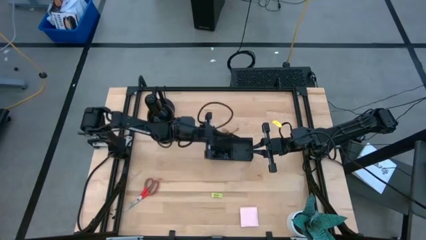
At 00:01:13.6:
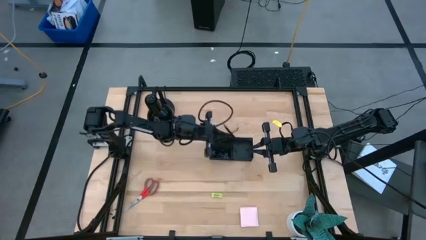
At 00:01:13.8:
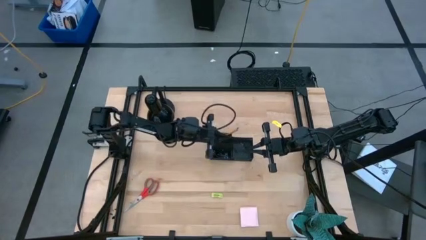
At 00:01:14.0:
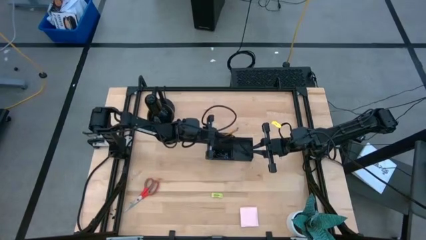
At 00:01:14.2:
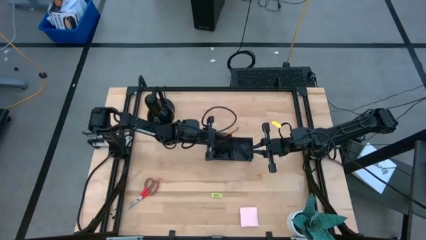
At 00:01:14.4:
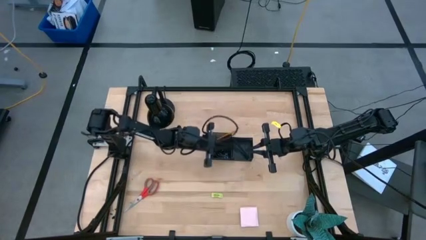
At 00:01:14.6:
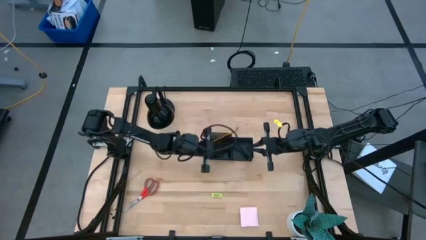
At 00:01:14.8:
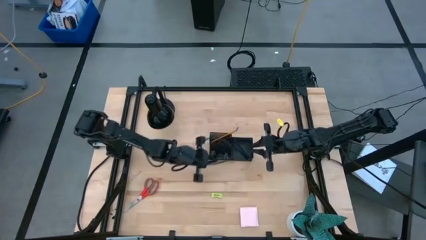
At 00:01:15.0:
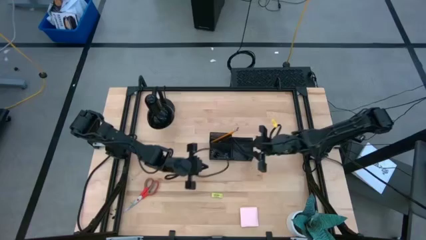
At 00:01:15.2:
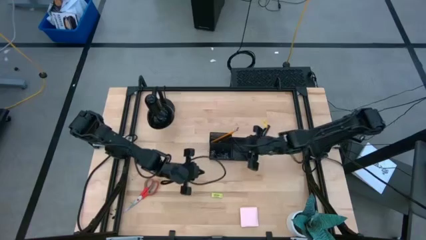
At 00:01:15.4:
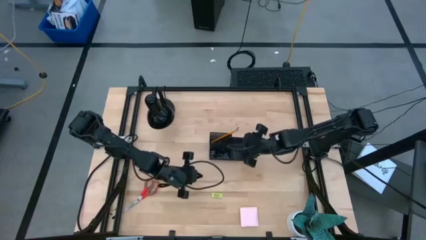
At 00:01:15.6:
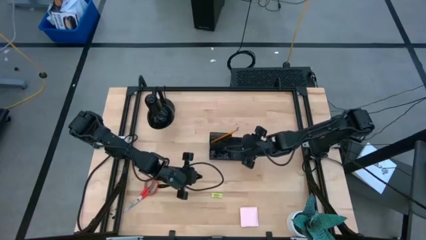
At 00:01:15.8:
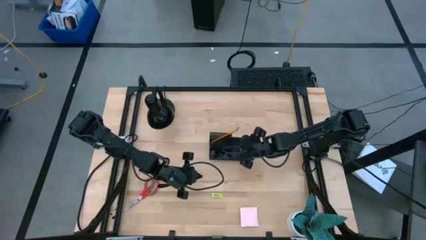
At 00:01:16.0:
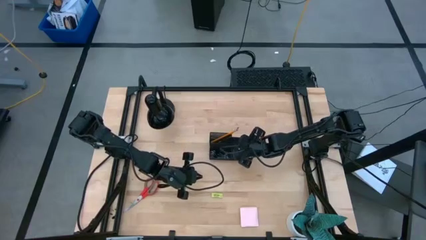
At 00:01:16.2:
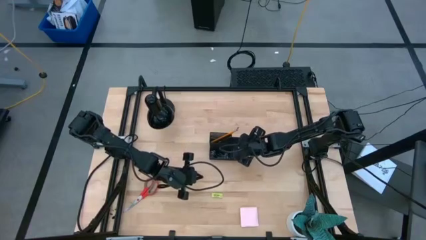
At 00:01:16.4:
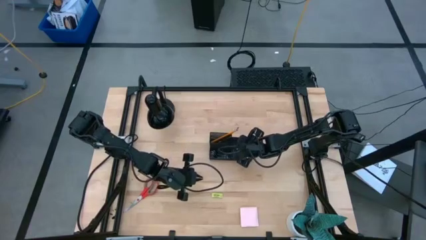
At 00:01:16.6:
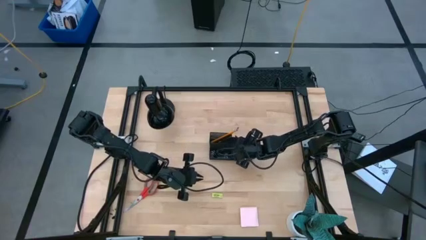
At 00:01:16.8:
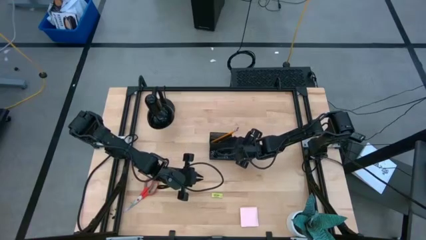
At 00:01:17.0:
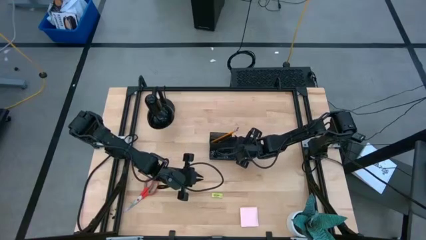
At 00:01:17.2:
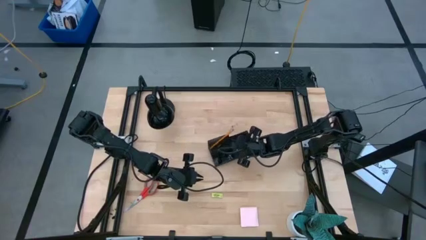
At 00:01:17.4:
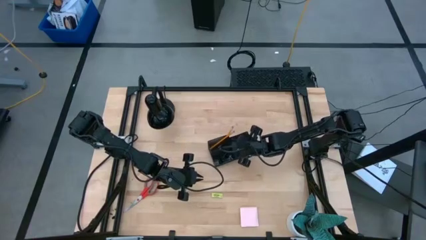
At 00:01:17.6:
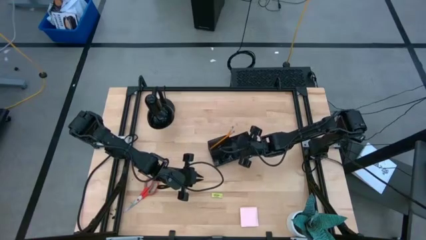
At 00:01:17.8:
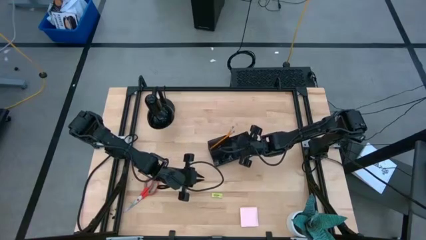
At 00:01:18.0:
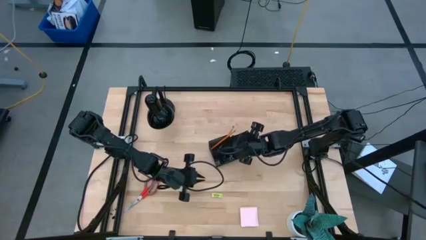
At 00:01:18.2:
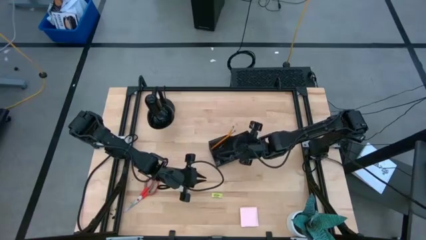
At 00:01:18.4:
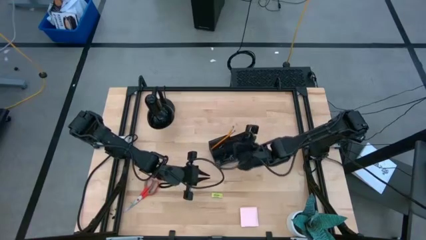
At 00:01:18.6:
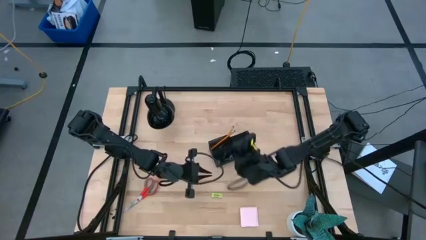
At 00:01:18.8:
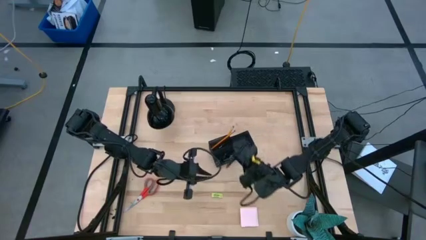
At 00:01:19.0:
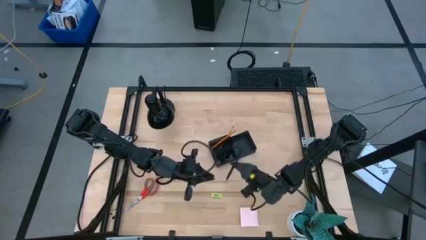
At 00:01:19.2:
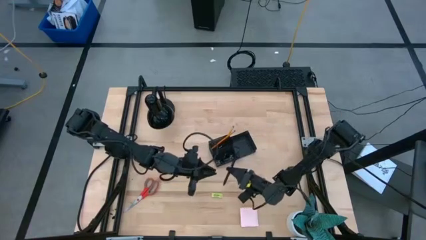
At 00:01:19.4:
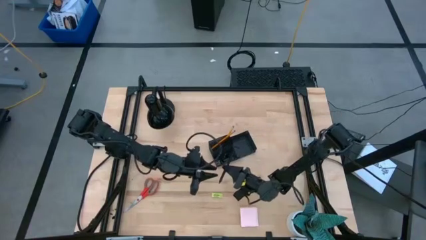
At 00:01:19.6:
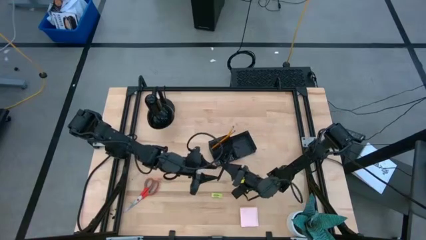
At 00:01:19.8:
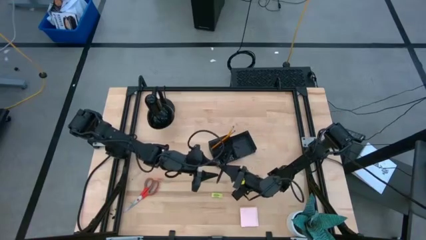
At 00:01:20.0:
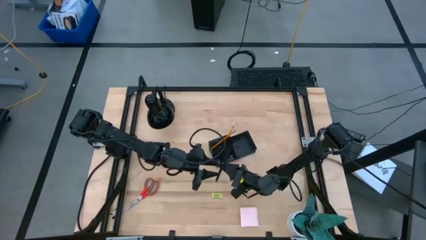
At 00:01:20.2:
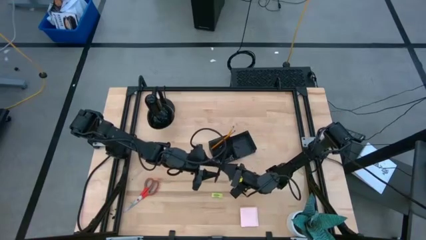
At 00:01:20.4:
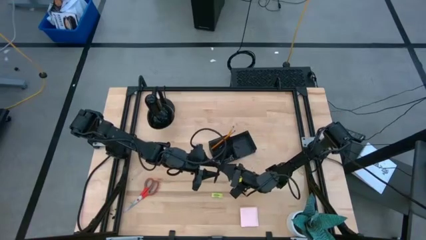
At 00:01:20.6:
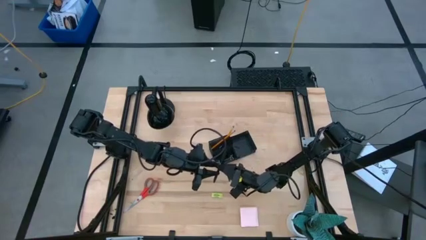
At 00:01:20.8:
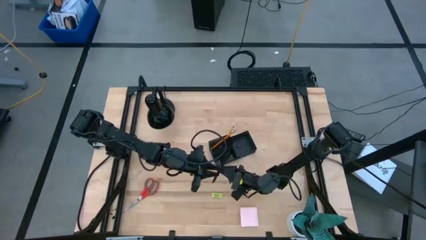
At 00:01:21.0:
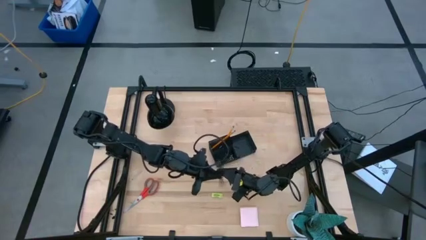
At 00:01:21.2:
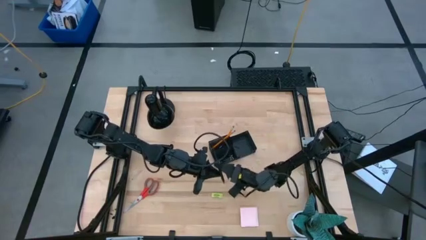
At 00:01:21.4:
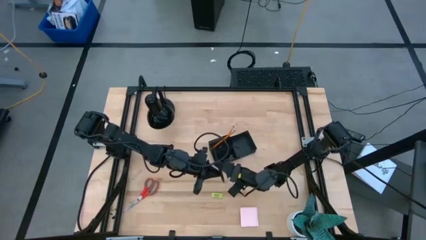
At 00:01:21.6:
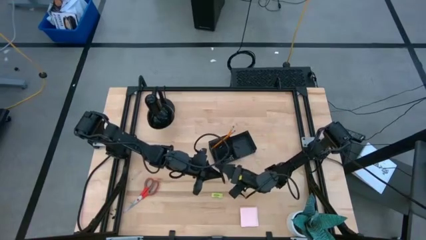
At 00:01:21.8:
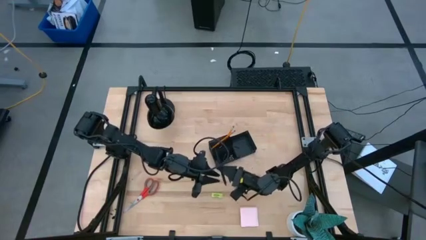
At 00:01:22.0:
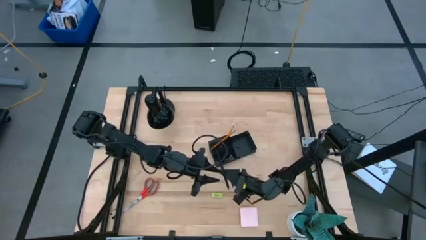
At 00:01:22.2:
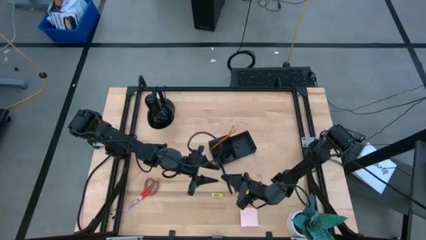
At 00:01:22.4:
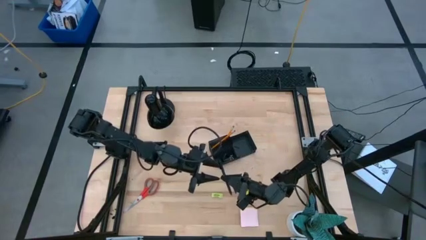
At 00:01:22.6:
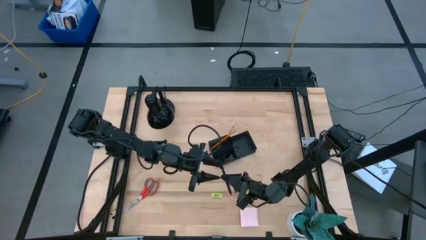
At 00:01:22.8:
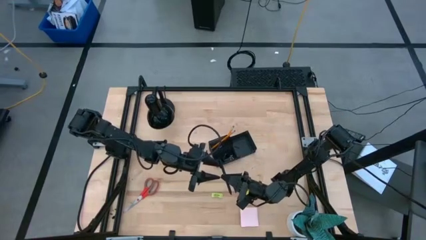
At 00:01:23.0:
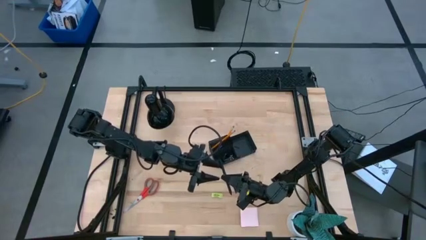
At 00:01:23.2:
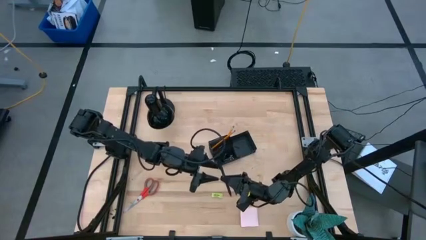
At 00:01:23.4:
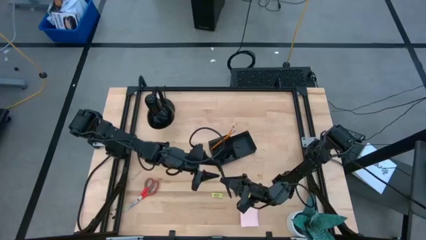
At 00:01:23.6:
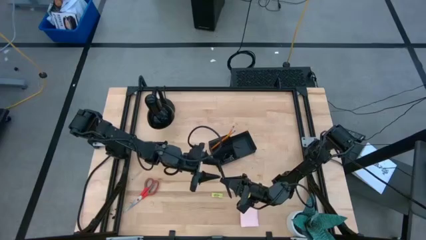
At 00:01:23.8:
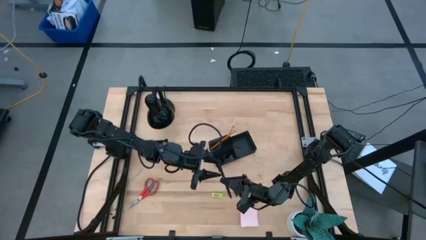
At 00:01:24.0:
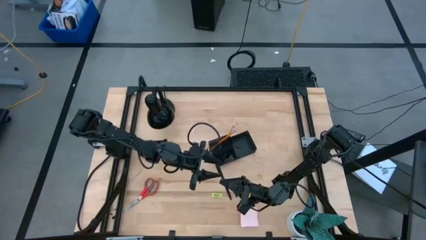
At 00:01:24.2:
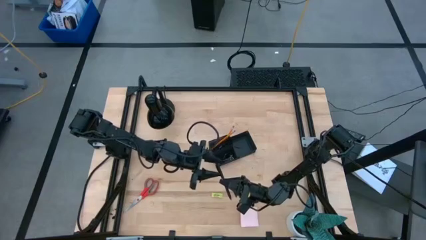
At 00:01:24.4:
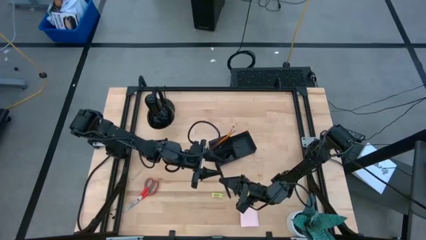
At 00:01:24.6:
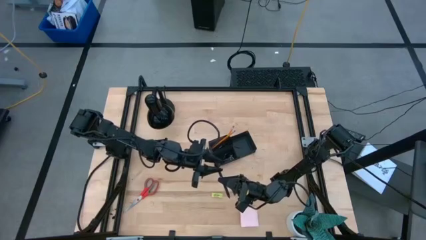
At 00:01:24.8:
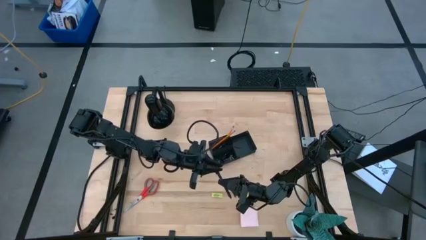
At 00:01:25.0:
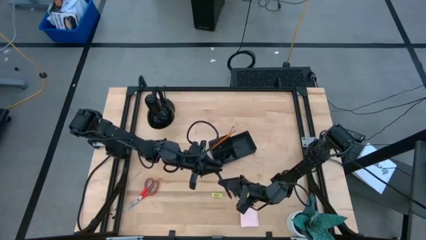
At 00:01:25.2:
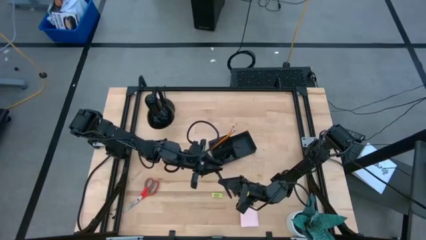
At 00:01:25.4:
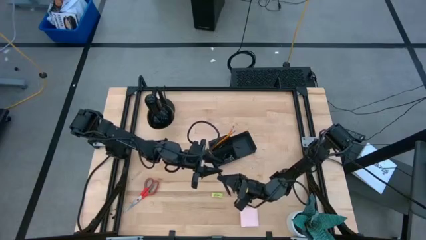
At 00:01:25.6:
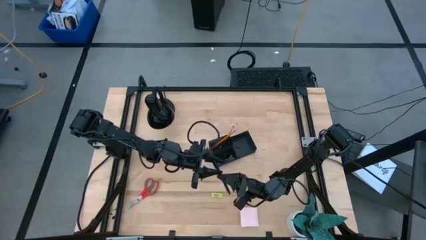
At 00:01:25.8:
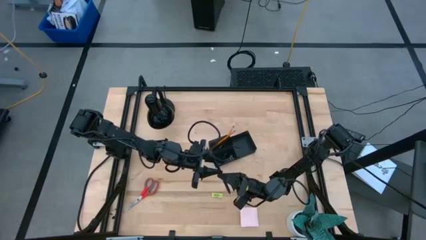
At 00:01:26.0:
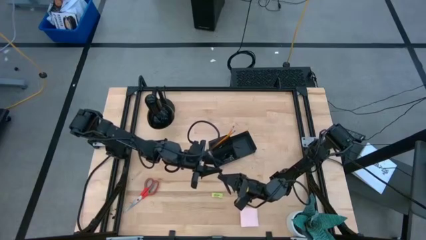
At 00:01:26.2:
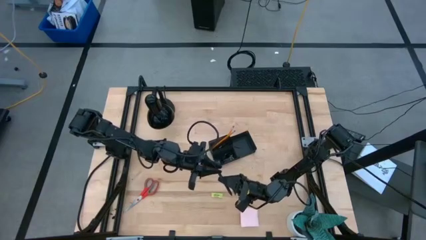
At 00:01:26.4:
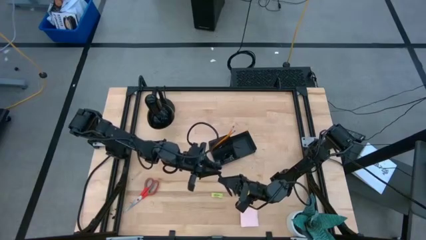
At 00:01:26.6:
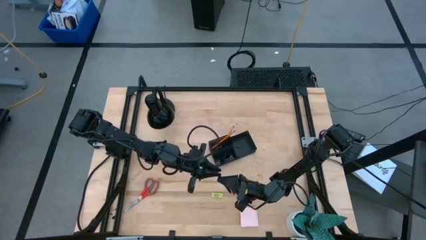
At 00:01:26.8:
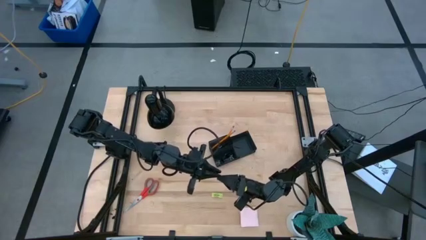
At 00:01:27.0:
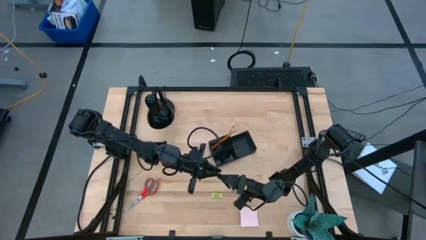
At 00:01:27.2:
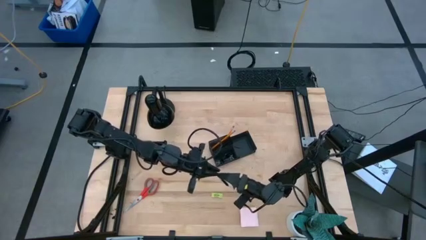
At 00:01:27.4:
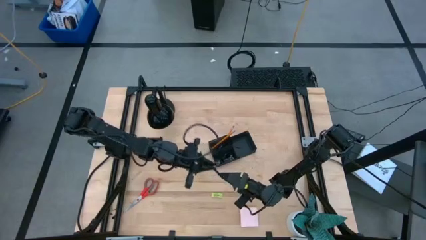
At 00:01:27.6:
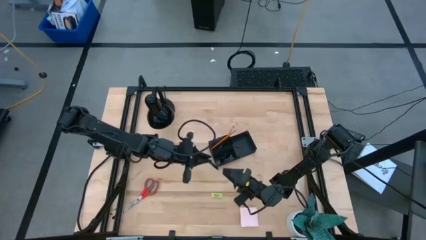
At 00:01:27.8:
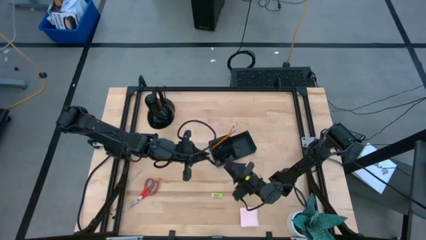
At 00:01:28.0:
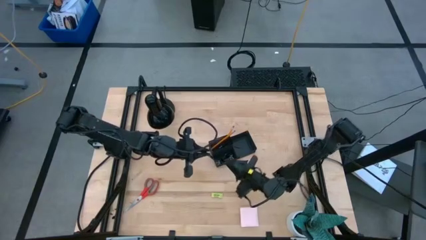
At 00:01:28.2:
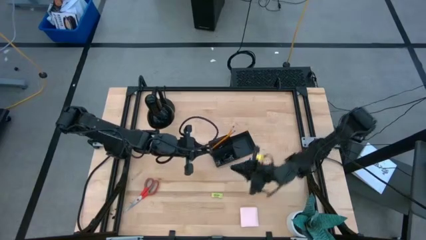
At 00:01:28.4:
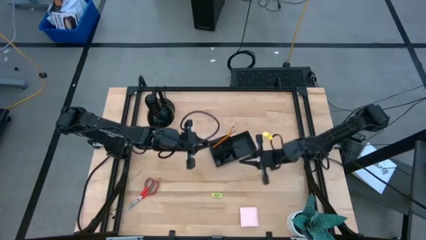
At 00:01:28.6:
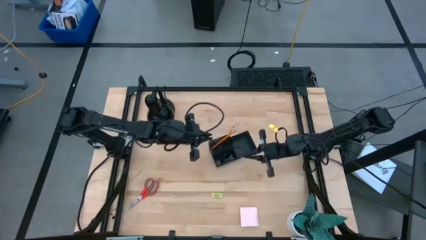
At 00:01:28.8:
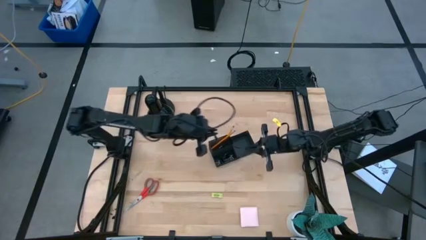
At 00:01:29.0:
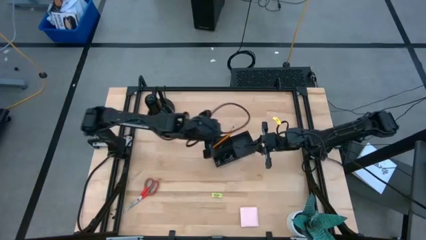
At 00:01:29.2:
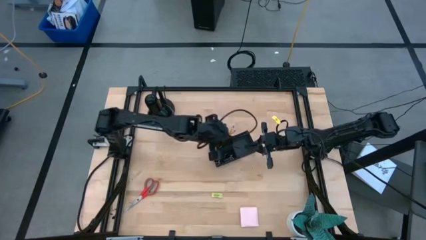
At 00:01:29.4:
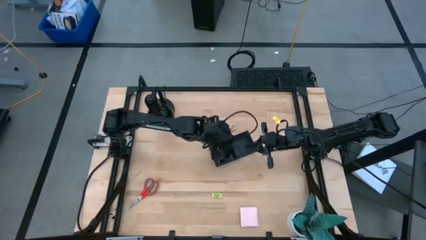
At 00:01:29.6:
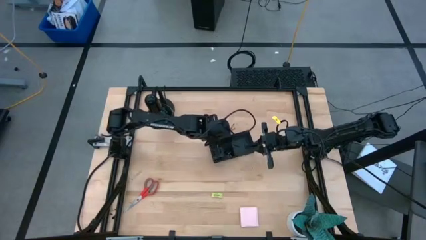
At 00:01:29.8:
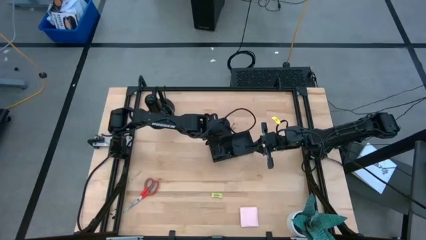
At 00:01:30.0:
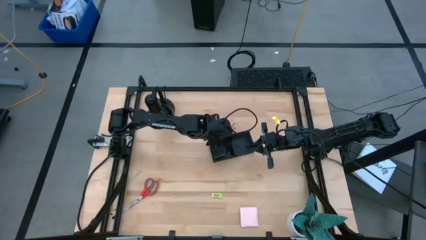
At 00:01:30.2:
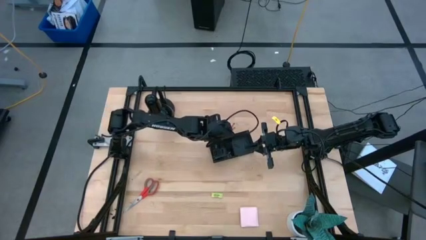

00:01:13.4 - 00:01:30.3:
Task: Pick and place office supplies into organizer
Put the black pen into the black desk organizer

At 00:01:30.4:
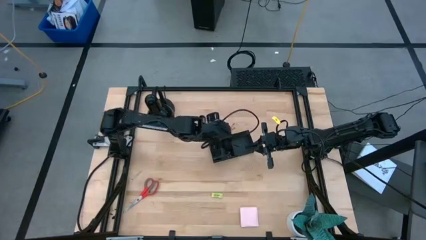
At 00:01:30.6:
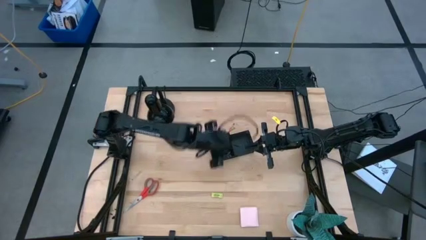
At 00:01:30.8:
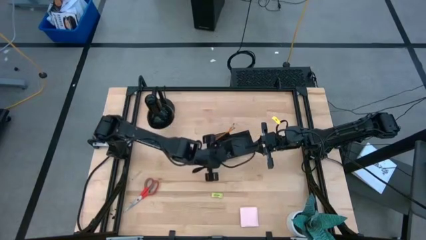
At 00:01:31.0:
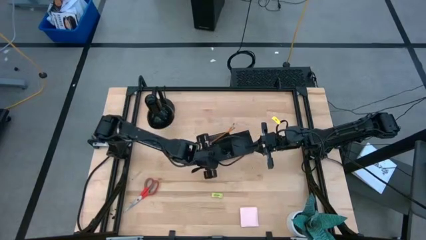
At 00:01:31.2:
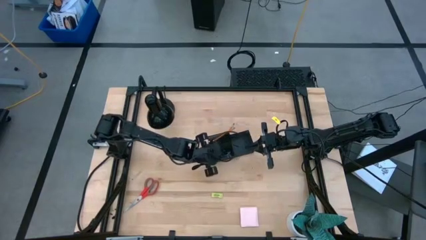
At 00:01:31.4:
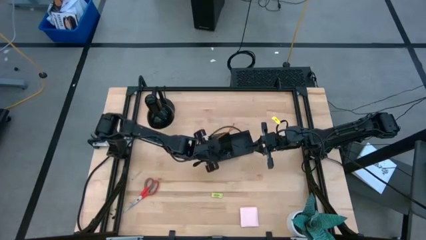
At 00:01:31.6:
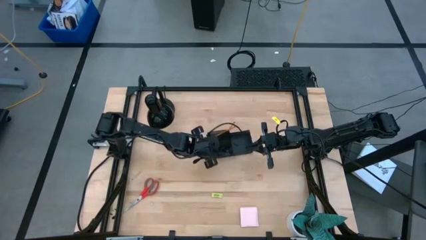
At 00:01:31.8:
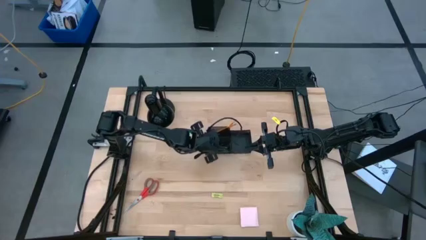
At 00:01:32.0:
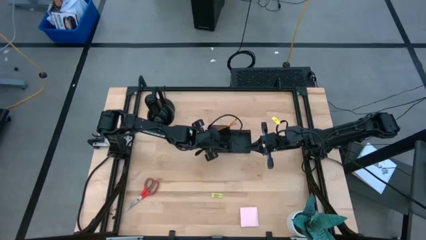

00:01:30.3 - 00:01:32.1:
Adjust the black desk organizer
